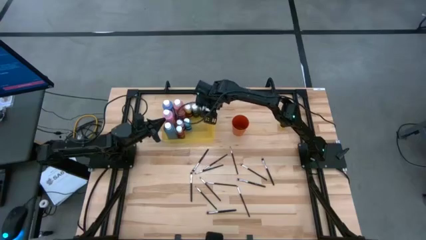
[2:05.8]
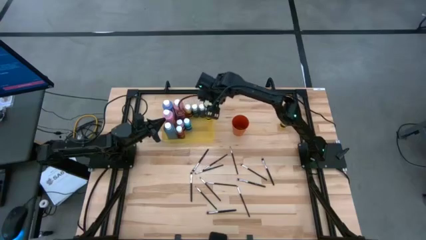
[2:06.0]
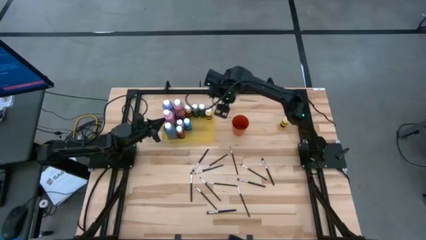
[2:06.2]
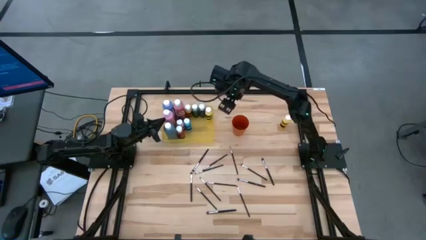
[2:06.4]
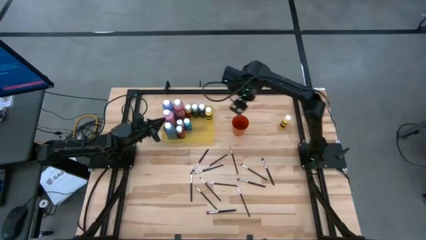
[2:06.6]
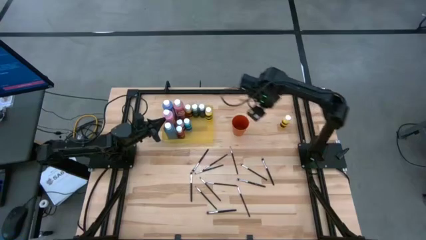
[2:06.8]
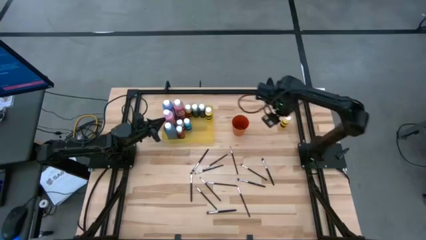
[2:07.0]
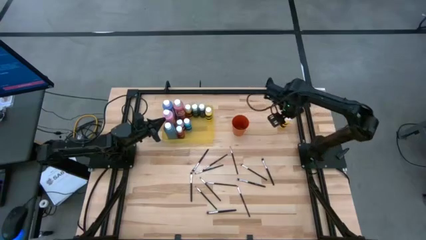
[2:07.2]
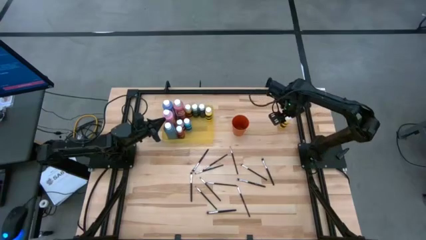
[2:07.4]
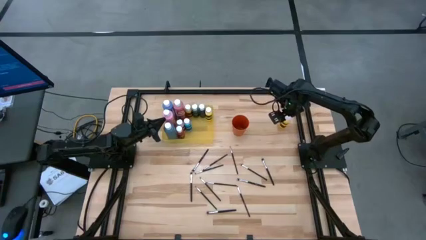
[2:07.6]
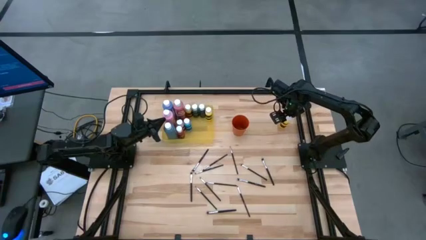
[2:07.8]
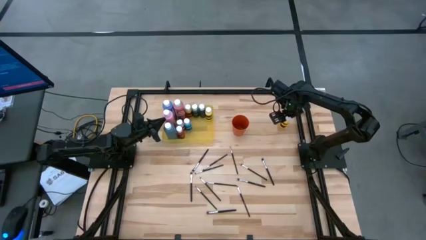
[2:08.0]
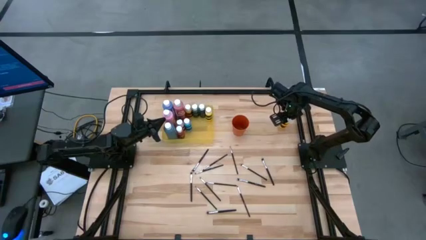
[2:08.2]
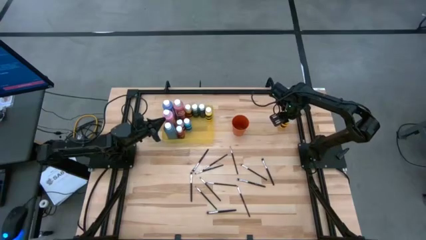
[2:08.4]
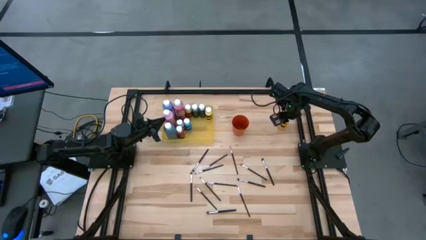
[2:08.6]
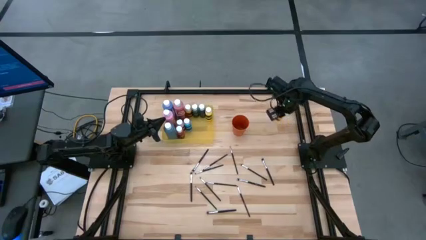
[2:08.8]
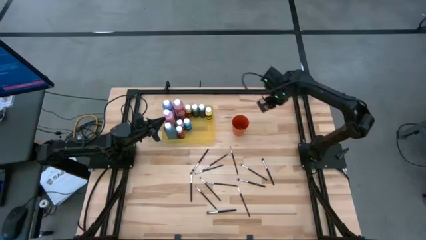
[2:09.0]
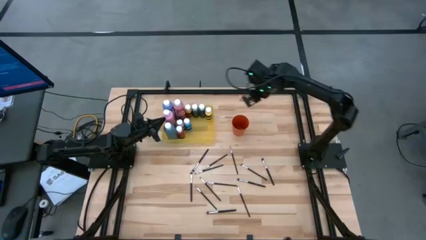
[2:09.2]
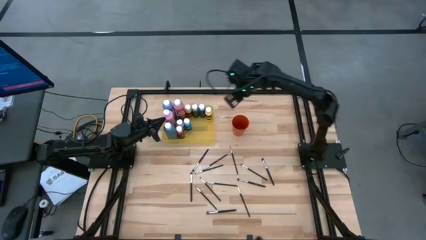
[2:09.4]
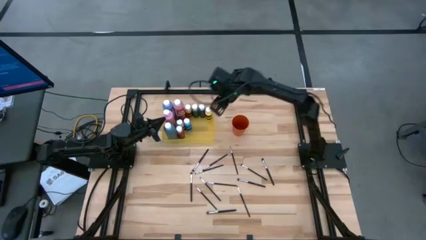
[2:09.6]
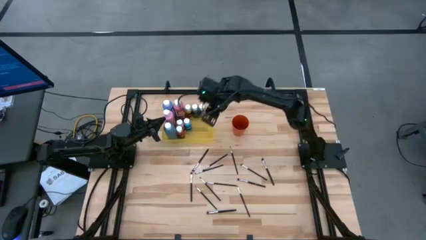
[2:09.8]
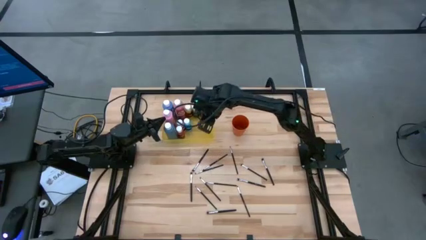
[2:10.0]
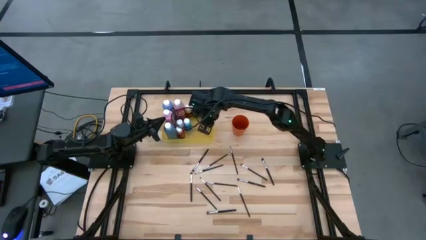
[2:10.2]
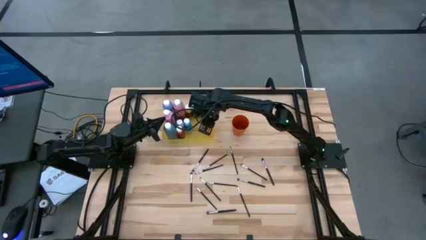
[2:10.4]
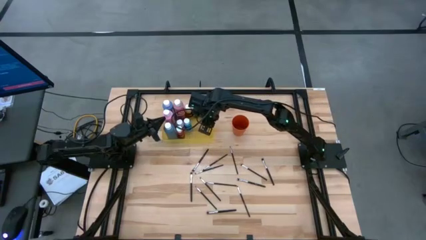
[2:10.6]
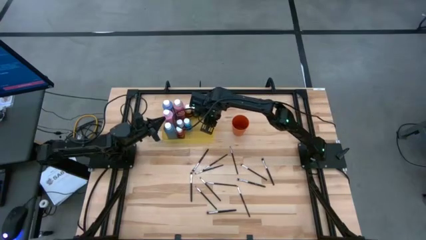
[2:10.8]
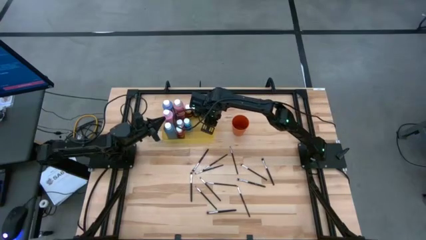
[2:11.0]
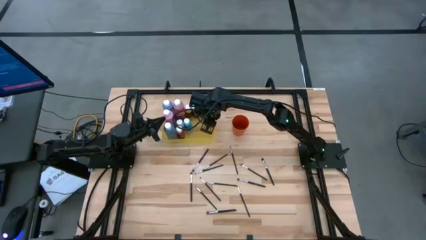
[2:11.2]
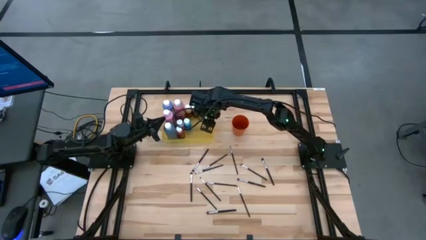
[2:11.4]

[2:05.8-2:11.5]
Task: Pick & Place Paint Supplies
Put the yellow bottle into the yellow bin

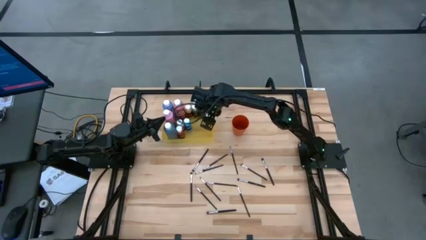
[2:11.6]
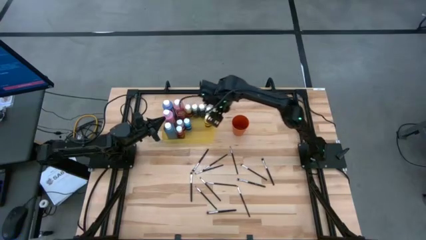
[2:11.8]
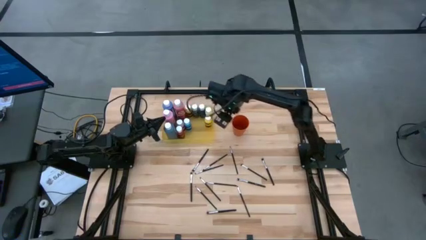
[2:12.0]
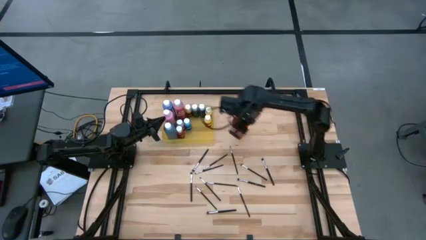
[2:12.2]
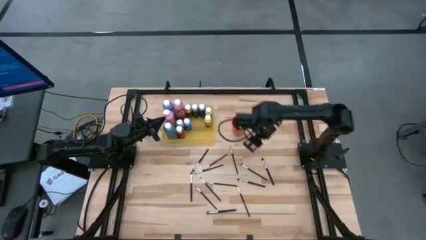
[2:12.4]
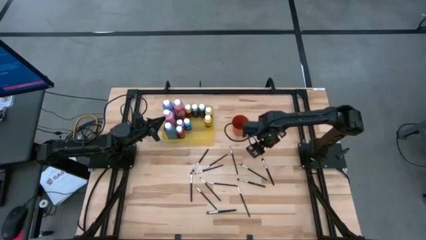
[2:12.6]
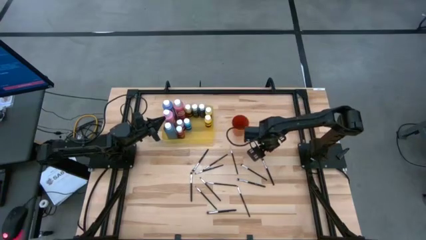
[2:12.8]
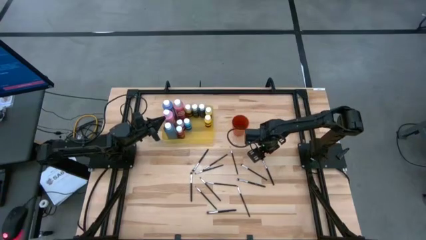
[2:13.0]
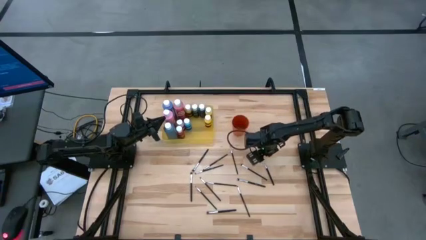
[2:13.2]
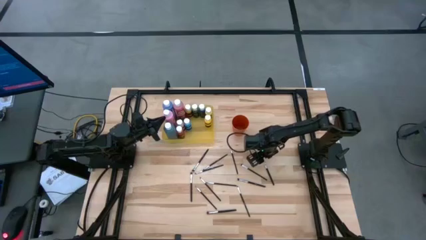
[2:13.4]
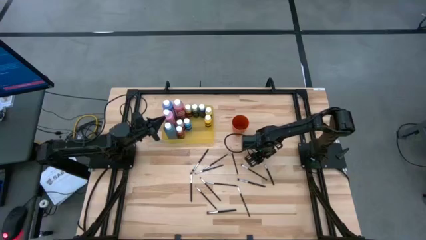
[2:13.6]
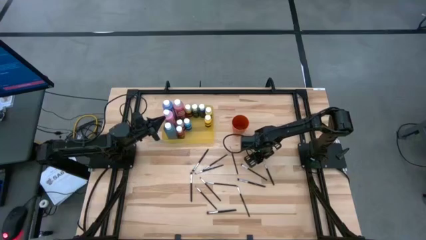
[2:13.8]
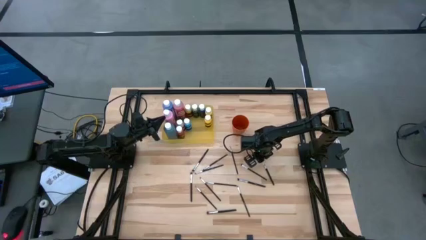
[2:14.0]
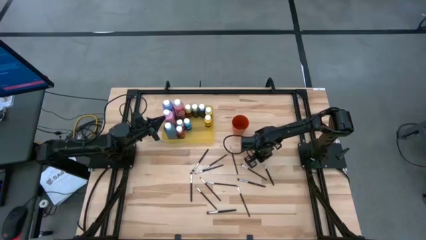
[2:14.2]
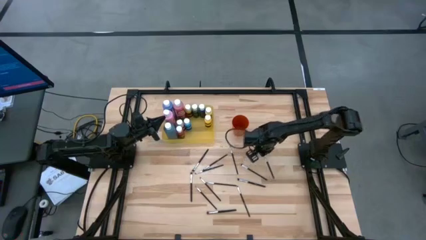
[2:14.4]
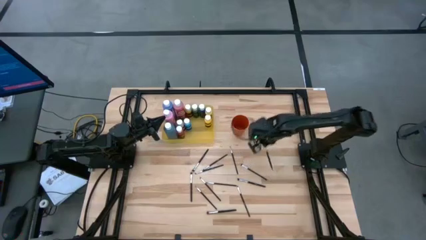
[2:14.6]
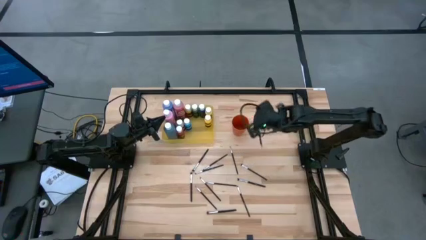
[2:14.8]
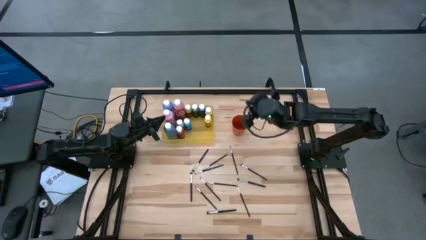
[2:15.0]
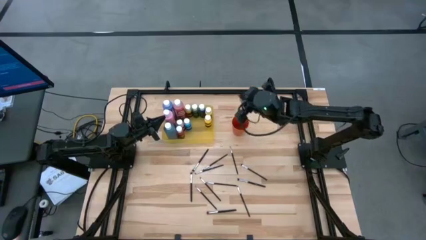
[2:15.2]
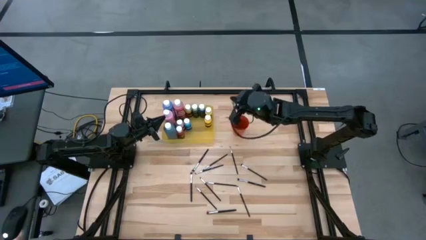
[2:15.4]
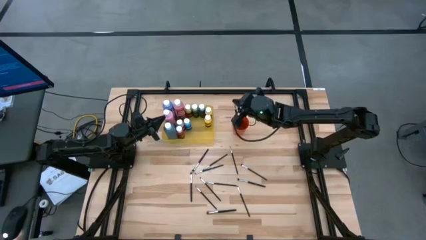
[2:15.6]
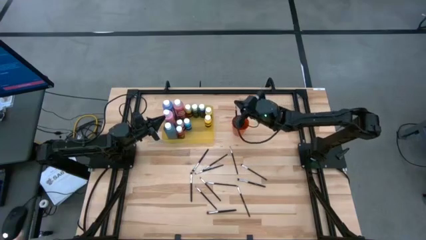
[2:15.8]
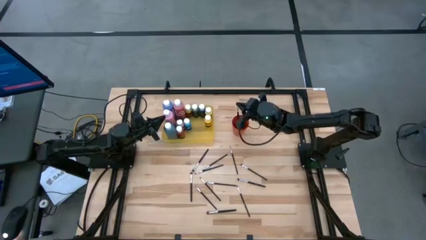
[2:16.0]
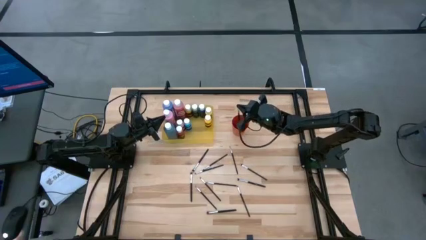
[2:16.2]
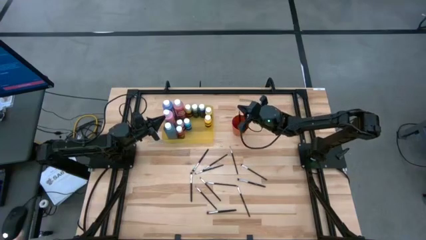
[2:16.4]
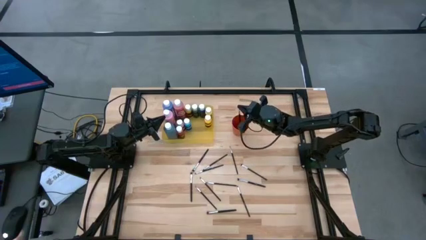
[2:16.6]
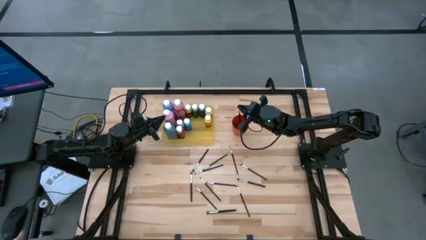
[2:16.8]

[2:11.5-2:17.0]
Put the silver paint brush into the orange cup

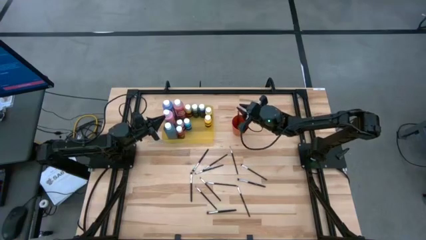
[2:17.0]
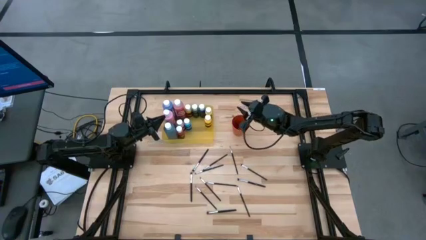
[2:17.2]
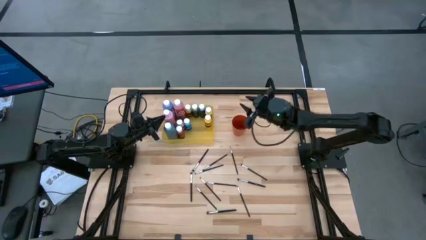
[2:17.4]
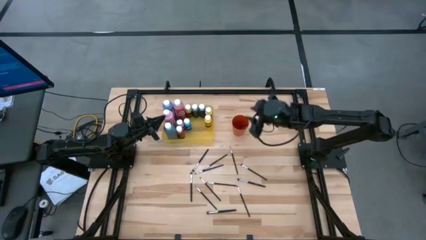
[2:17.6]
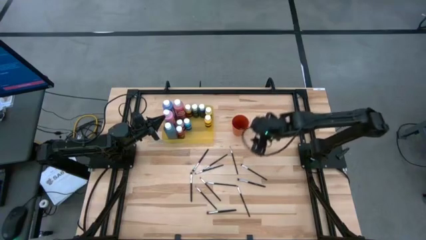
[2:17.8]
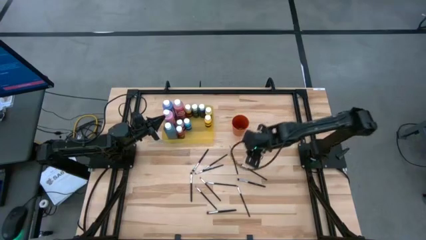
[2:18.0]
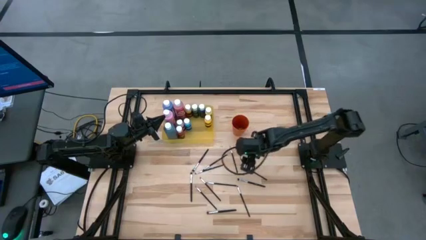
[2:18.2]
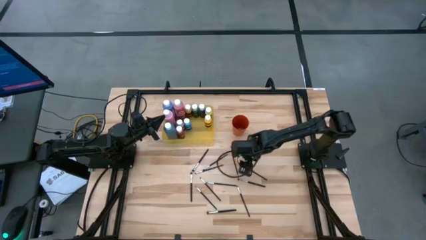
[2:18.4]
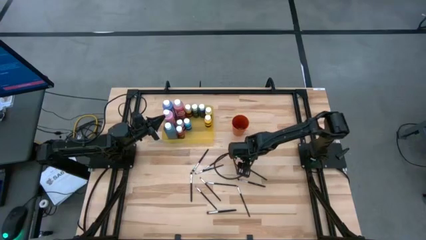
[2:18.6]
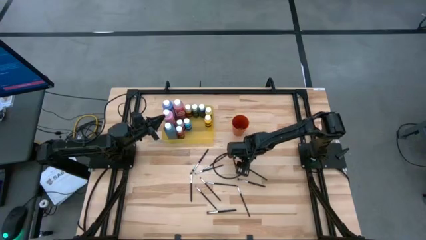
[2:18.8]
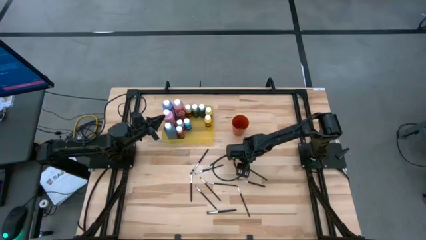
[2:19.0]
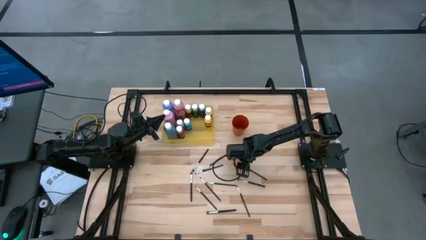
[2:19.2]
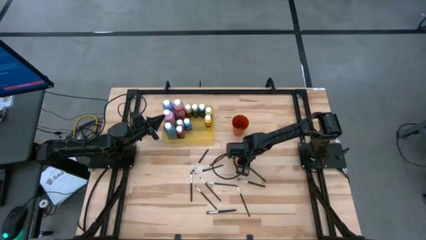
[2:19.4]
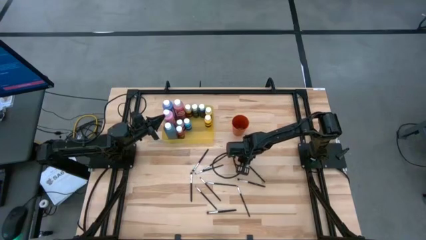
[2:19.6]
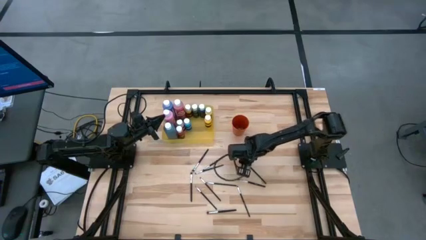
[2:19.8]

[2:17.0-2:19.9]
Put the silver paint brush into the orange cup
